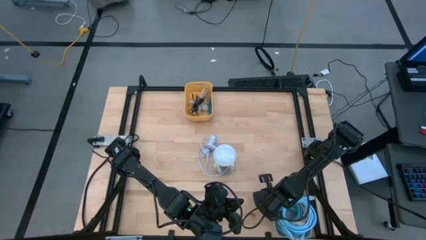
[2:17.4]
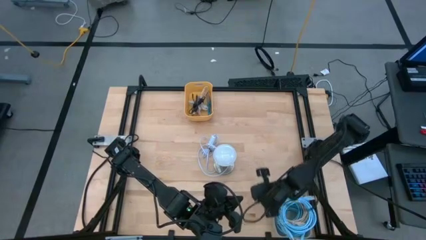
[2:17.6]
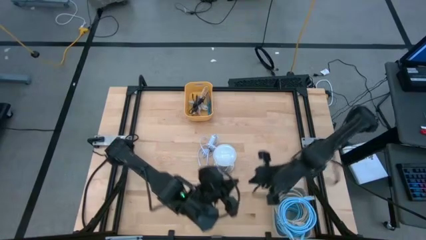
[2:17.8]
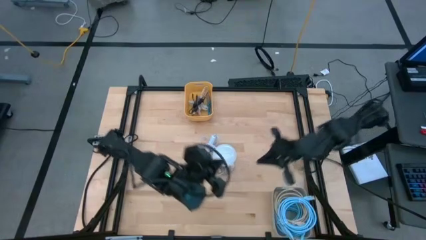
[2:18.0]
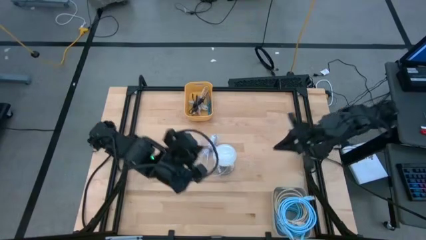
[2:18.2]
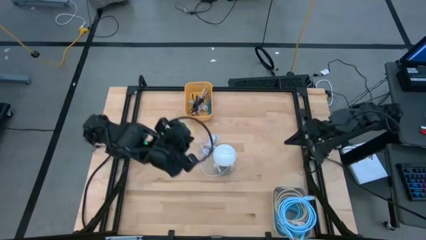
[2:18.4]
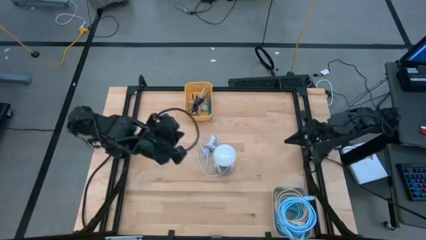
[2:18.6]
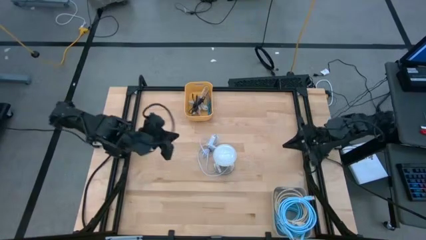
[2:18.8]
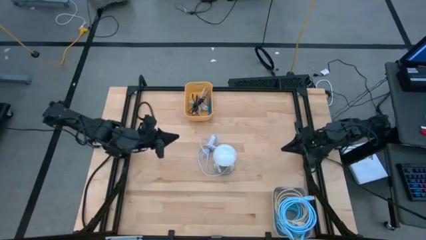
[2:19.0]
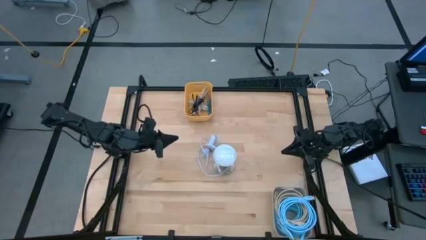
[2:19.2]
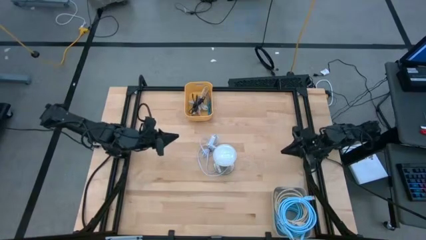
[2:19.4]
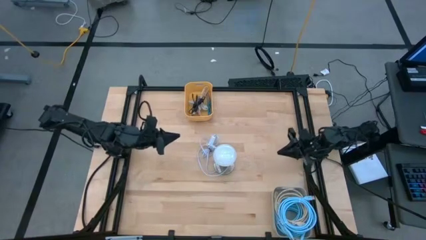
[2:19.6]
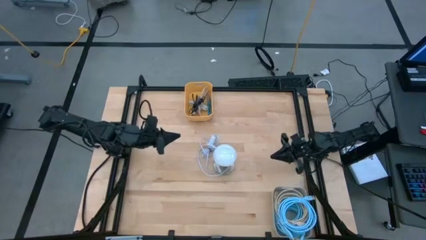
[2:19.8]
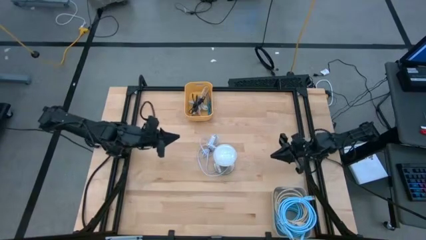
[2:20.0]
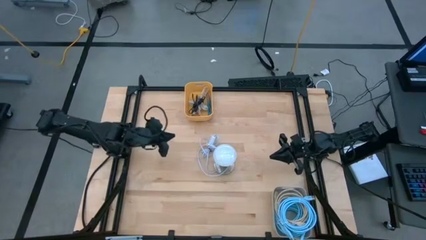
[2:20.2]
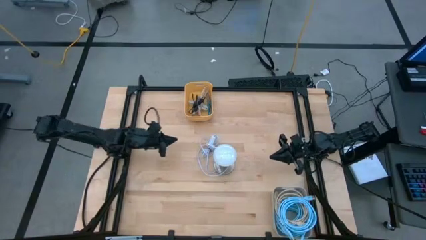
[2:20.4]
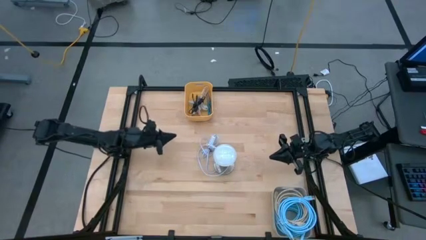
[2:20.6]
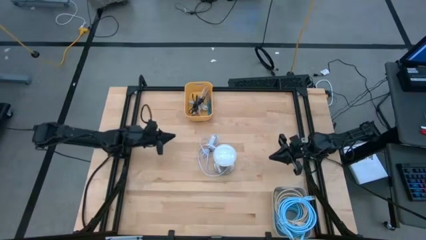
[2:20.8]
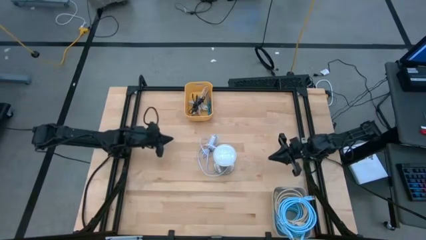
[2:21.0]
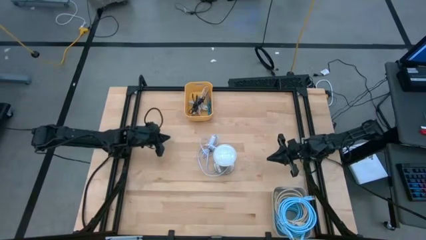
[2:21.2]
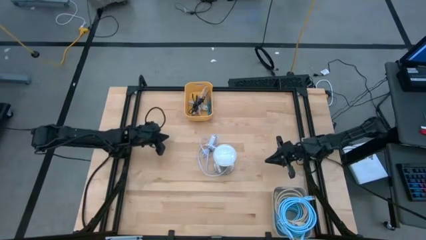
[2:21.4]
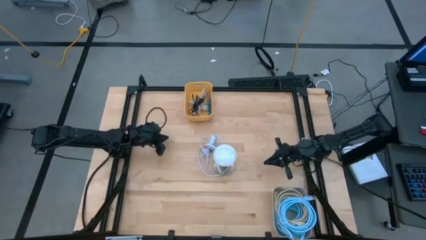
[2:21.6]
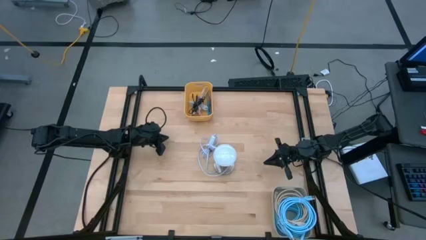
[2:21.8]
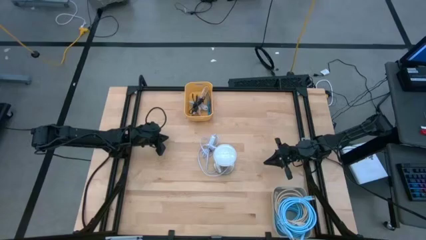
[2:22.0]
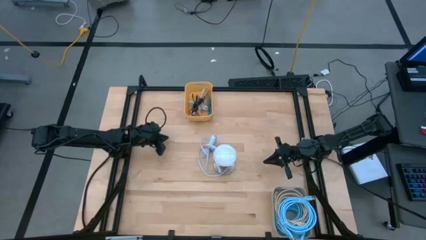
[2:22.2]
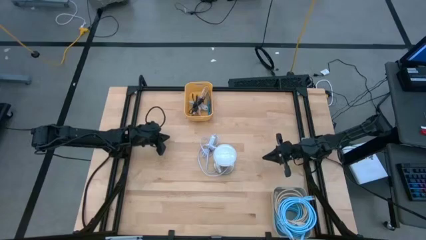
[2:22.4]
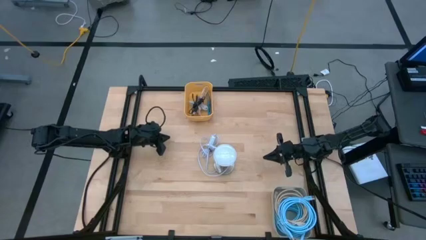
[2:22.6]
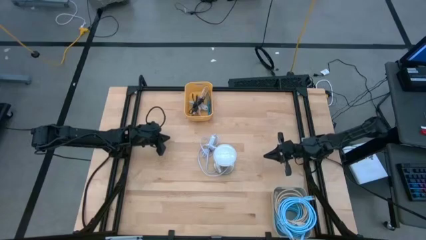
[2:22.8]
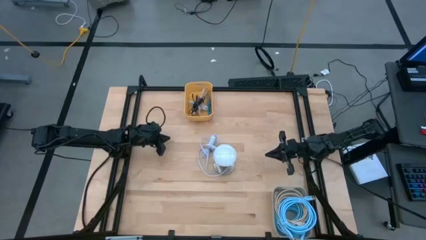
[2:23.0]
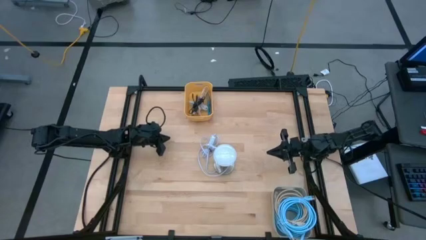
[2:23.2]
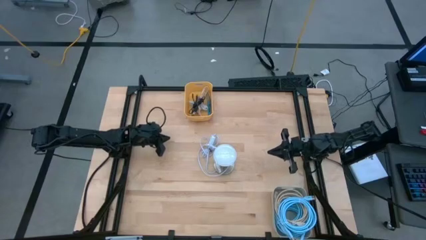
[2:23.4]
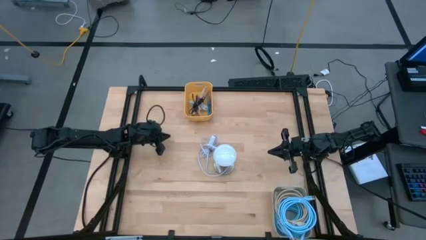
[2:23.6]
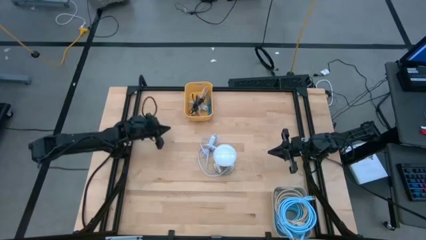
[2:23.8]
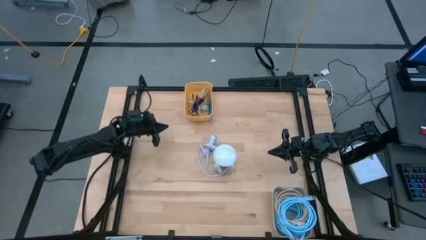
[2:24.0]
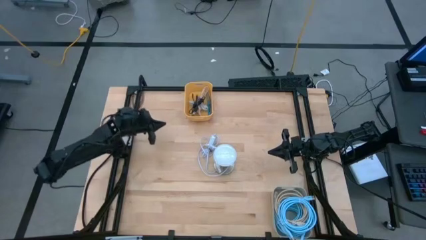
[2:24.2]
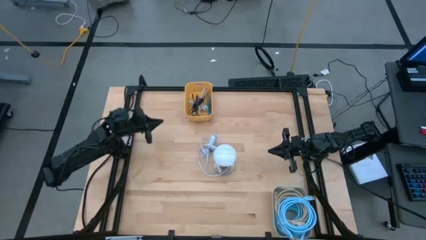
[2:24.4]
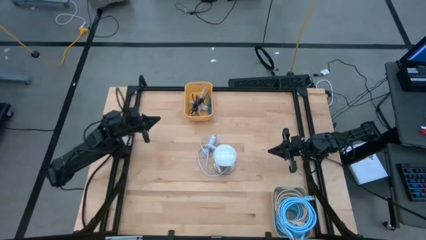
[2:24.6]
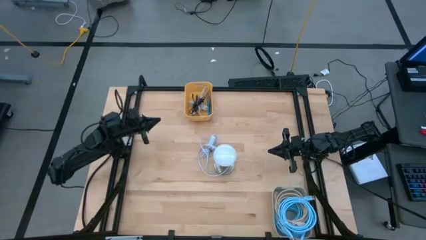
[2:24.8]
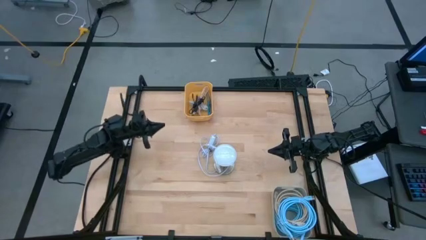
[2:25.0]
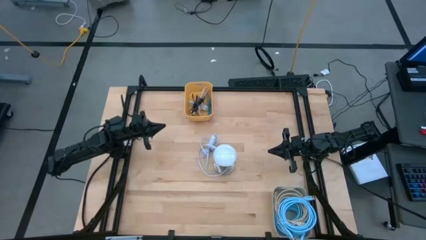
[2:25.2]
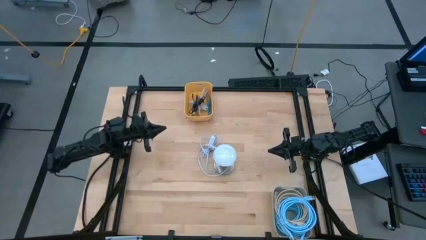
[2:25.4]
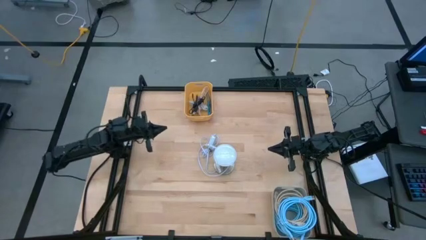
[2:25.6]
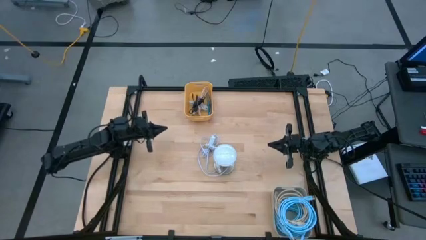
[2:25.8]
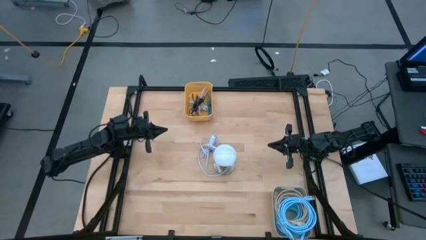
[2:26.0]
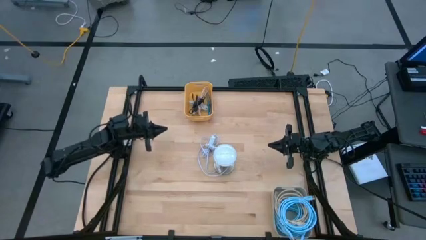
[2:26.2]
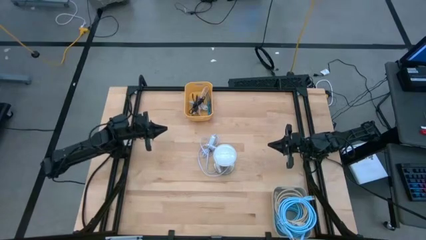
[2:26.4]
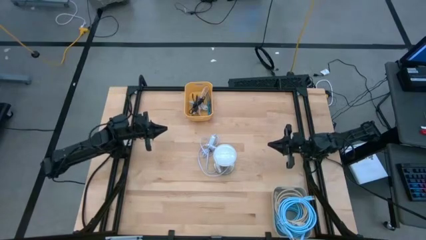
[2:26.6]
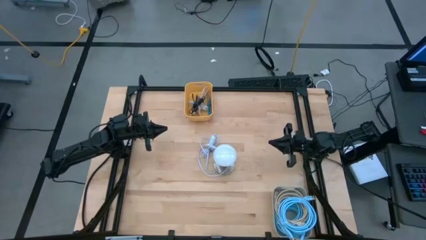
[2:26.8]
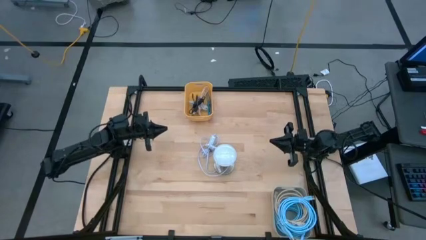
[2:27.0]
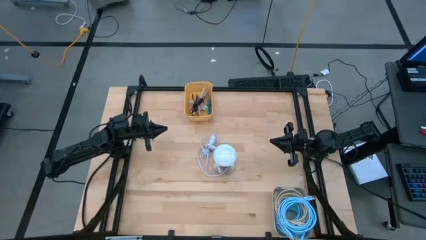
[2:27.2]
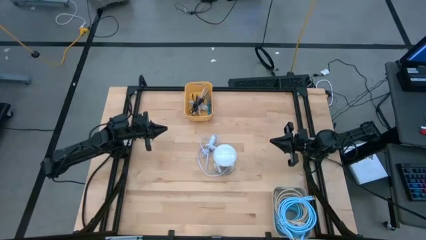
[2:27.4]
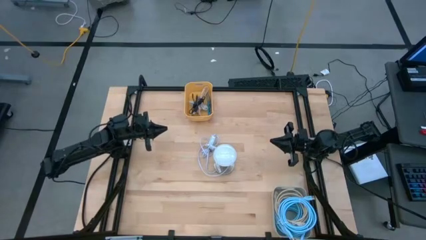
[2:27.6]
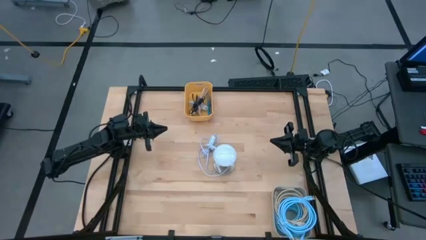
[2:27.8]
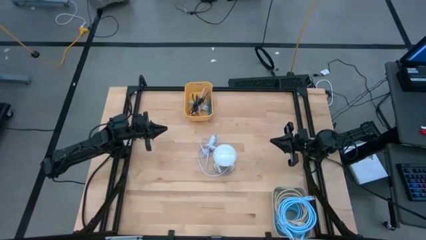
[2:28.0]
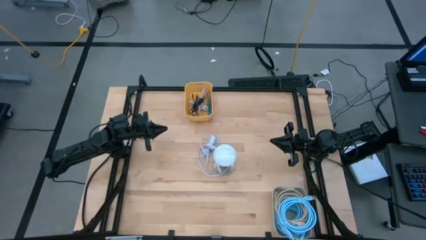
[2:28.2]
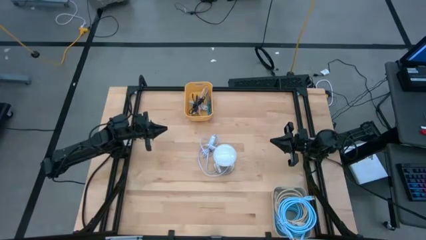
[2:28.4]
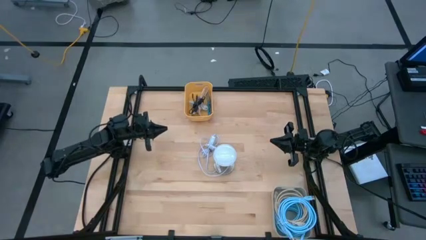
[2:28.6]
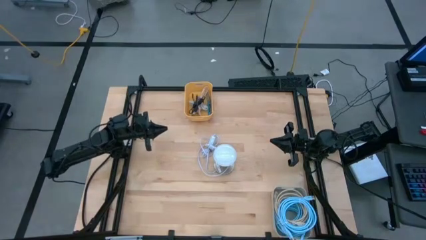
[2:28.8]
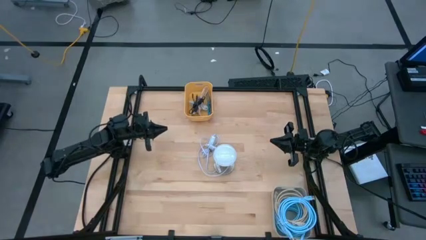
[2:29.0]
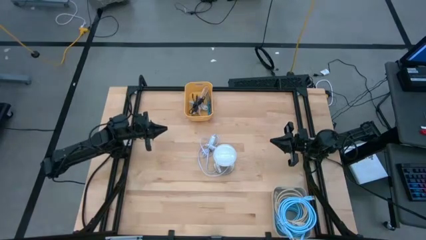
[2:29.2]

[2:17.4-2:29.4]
Task: Pick & Place USB Port
Return to Home Position
